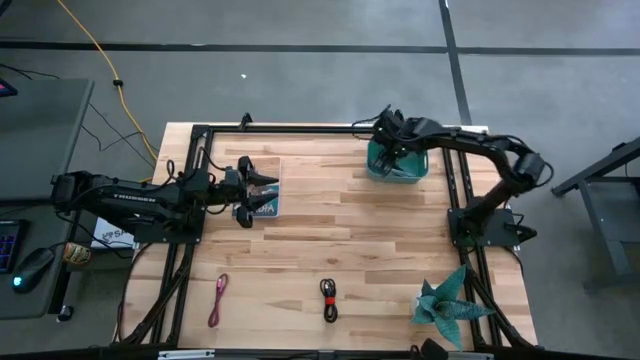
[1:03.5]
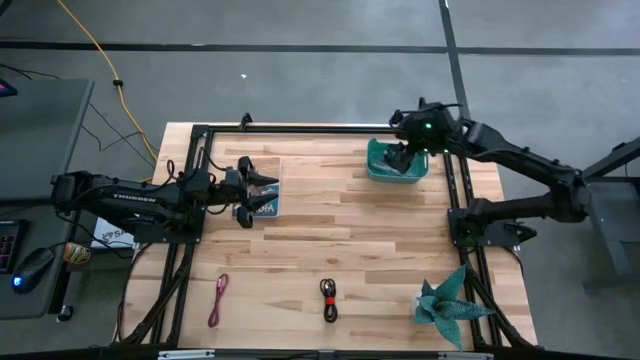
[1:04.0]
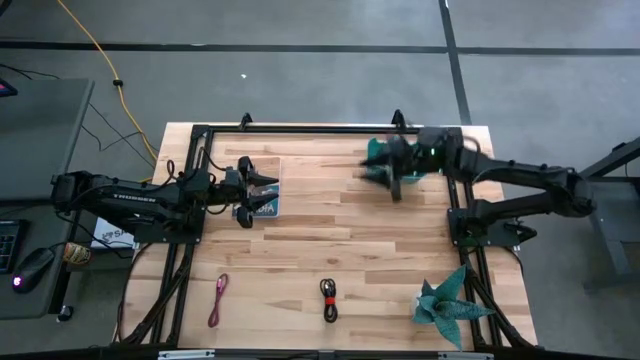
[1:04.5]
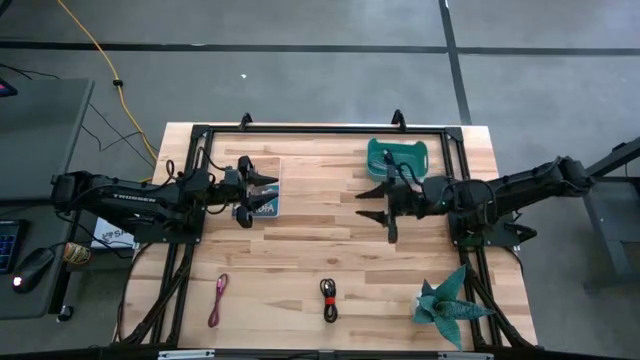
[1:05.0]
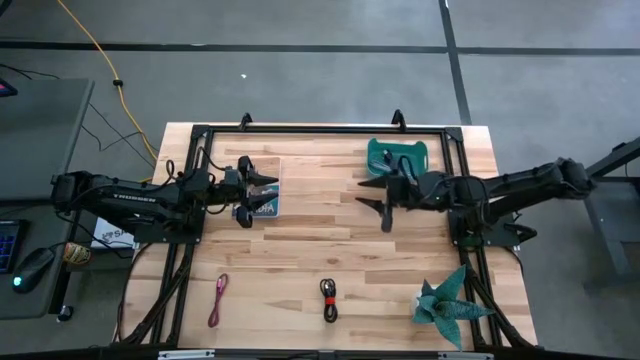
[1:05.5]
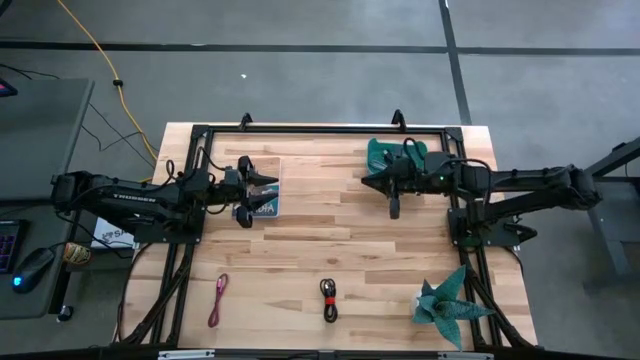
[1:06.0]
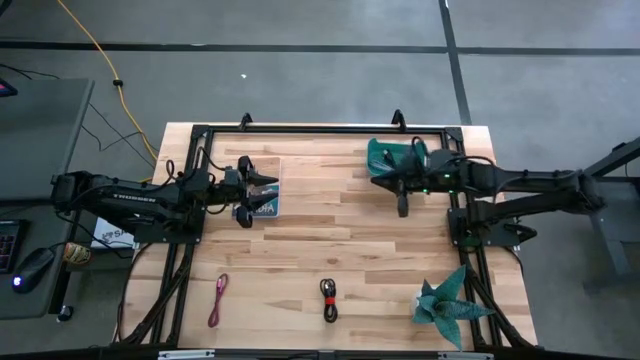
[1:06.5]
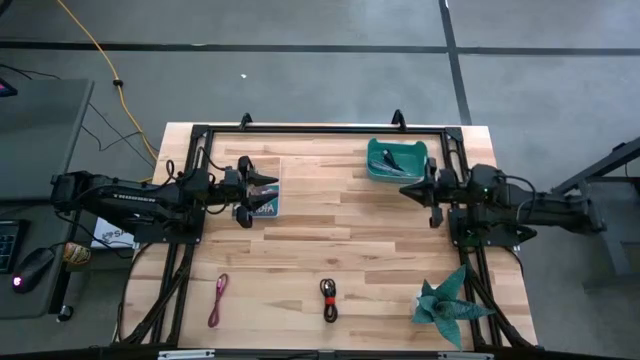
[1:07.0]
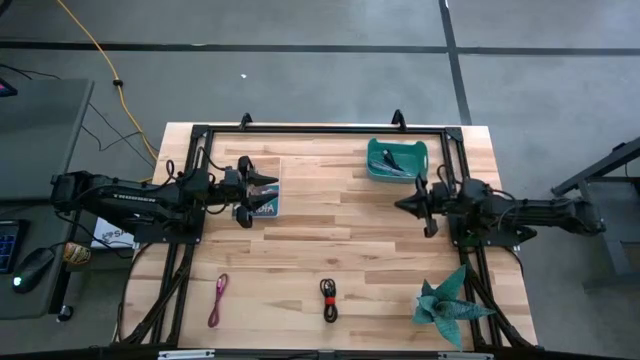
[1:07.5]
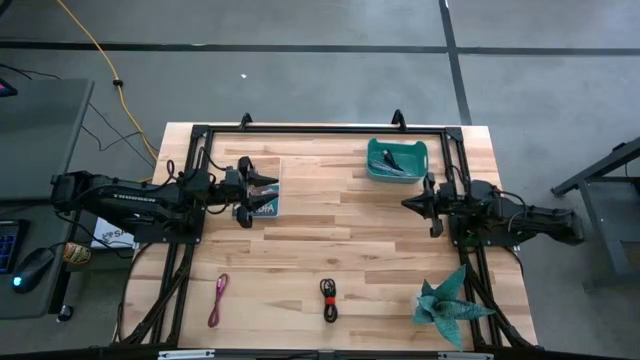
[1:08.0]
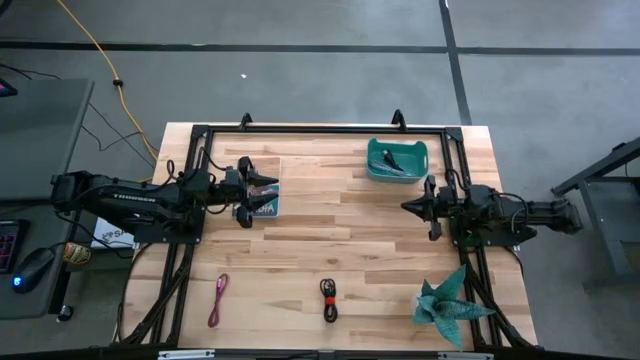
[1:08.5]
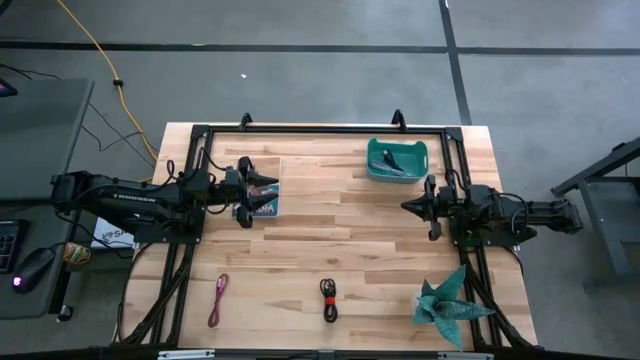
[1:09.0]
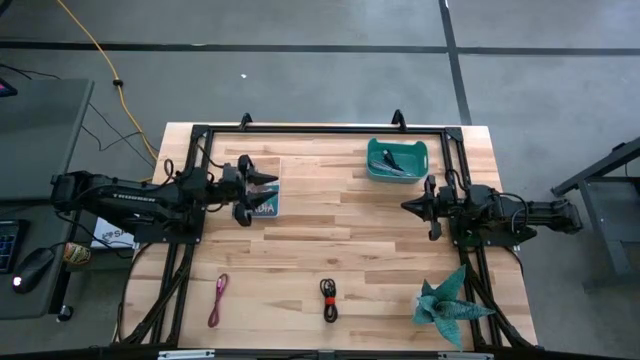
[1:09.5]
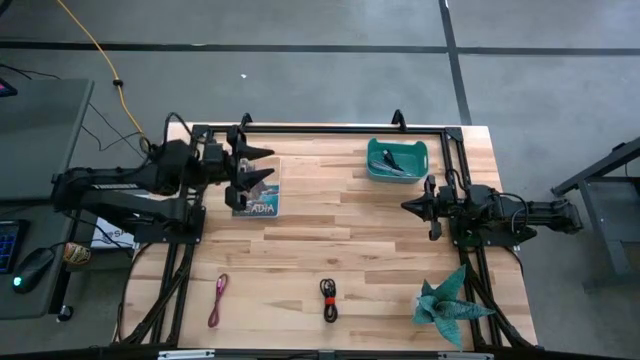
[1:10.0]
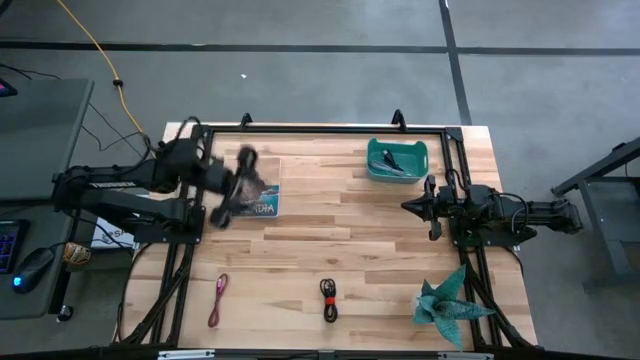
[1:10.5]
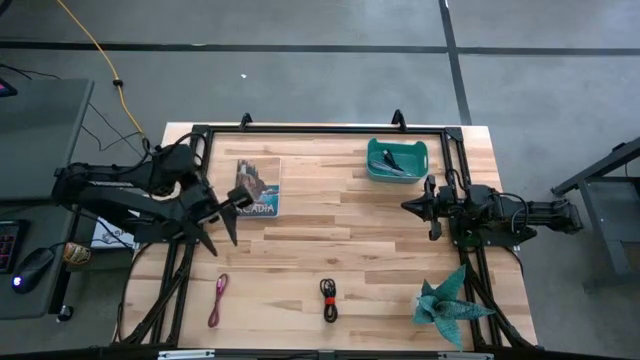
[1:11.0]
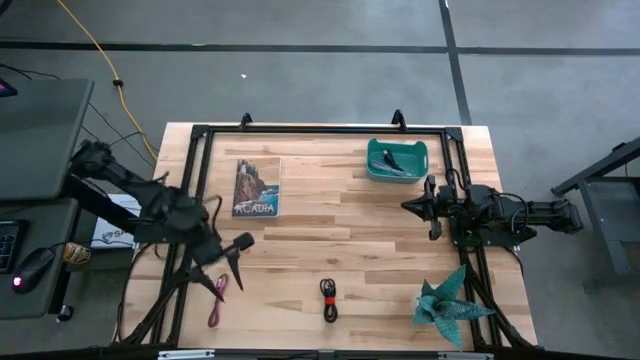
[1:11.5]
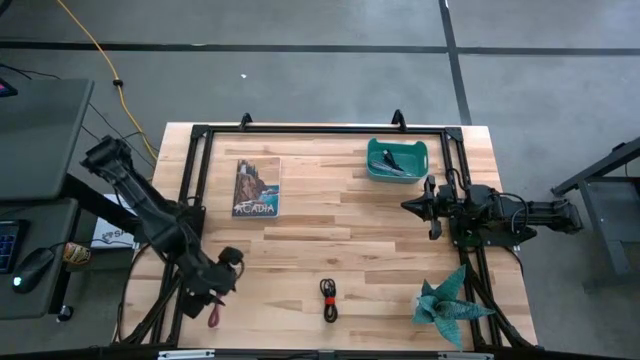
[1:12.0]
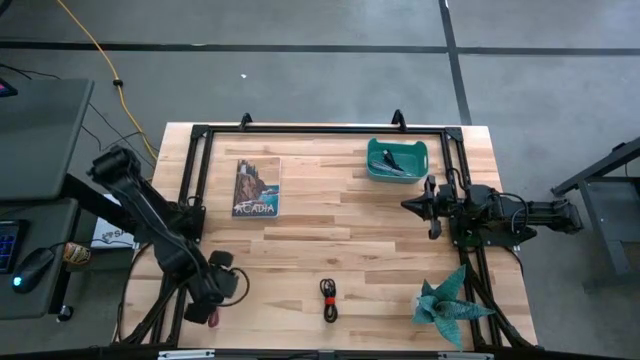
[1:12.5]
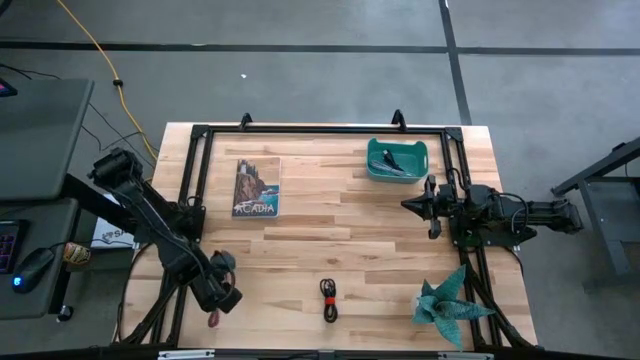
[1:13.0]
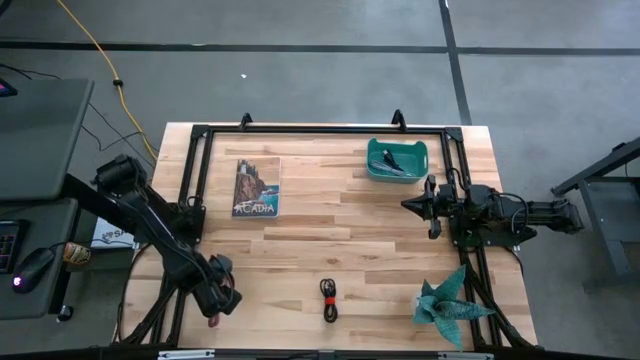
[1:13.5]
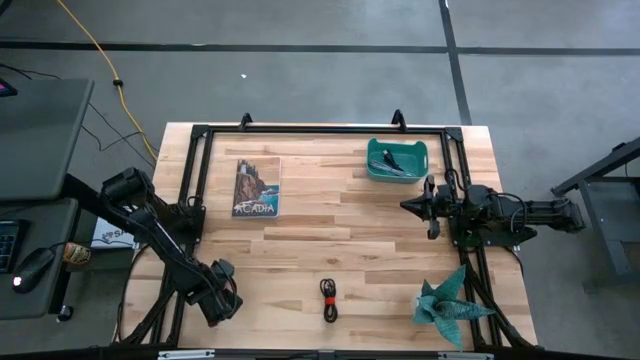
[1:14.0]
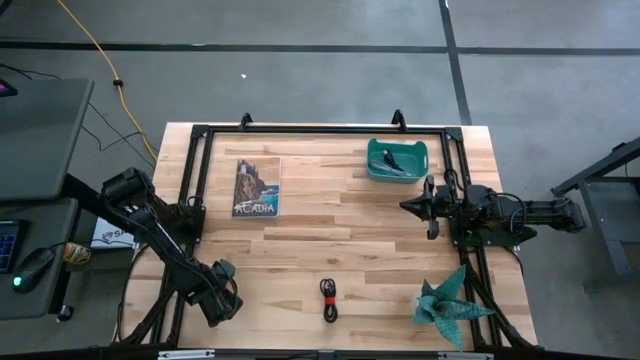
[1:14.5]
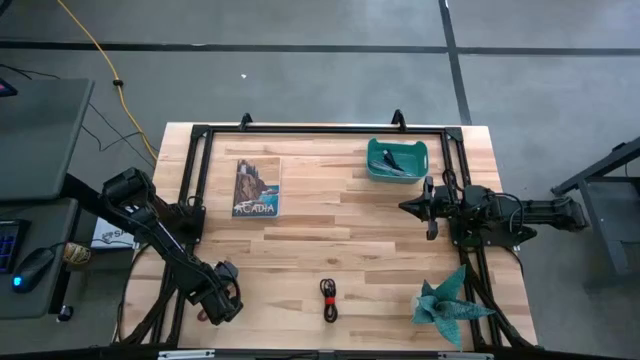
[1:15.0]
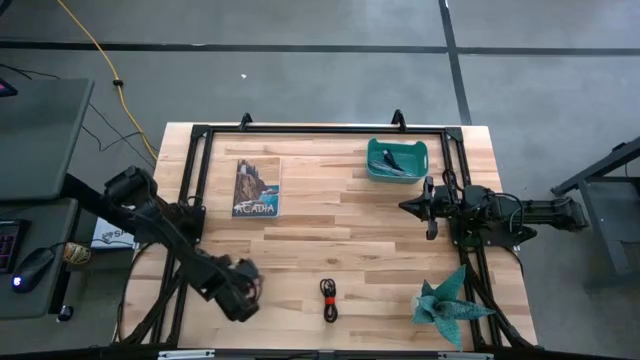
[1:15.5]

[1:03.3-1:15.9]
Task: Pick and place USB-C Cables
Put the pink charger cable into the green bin

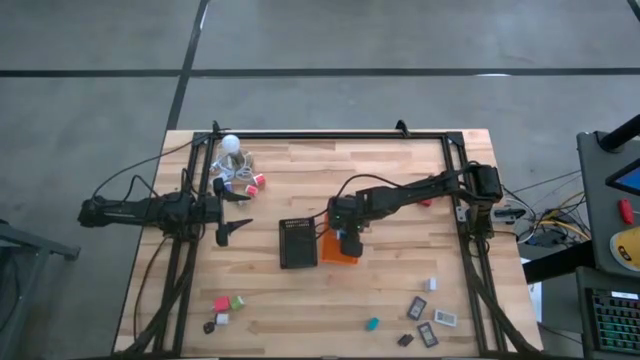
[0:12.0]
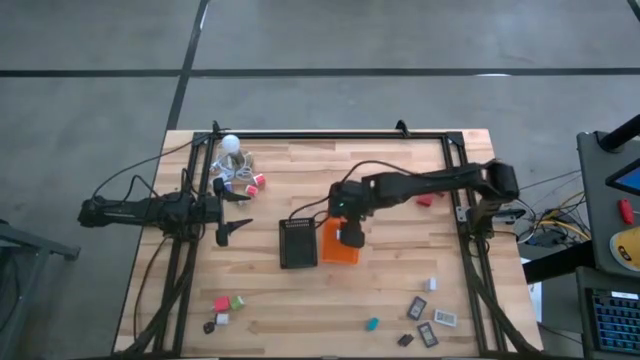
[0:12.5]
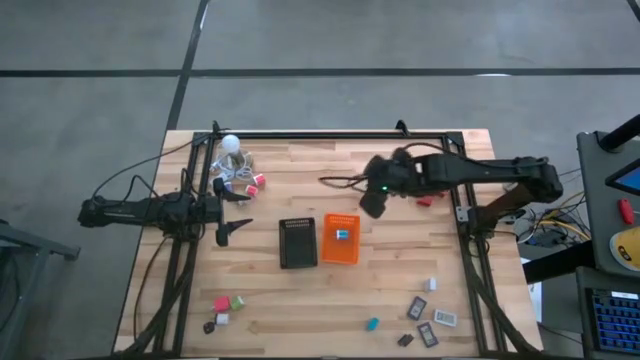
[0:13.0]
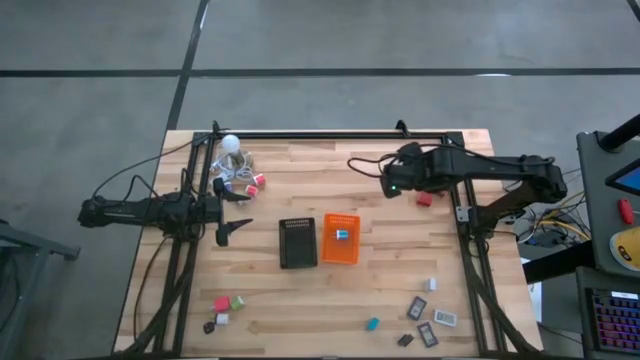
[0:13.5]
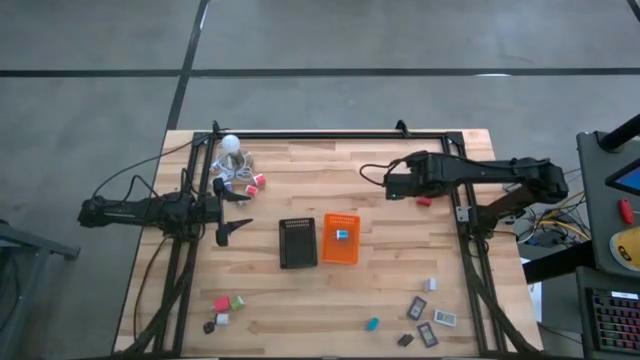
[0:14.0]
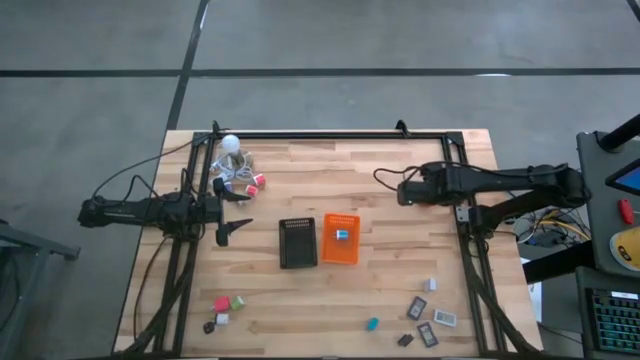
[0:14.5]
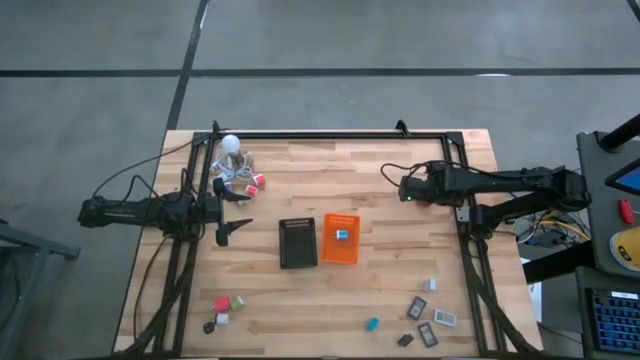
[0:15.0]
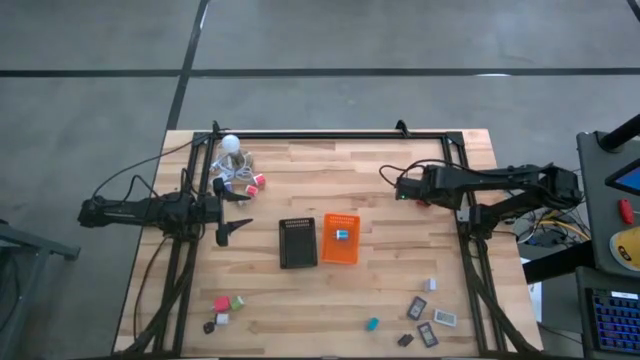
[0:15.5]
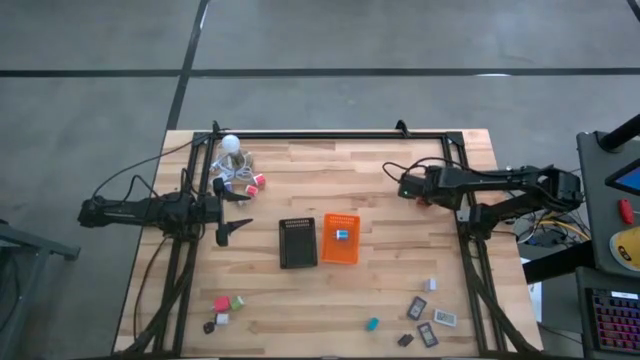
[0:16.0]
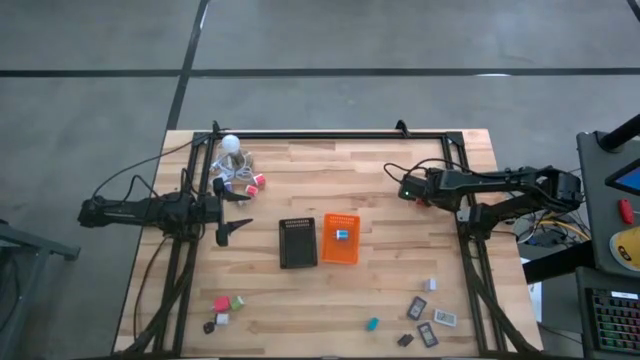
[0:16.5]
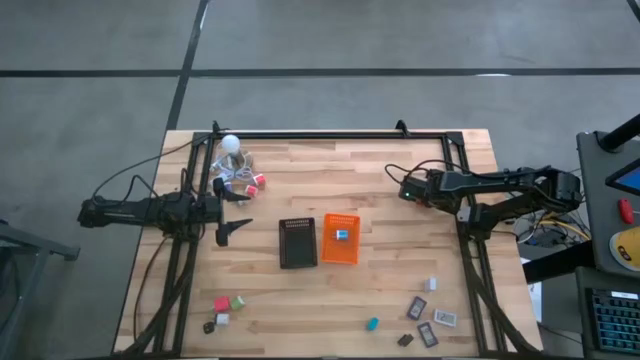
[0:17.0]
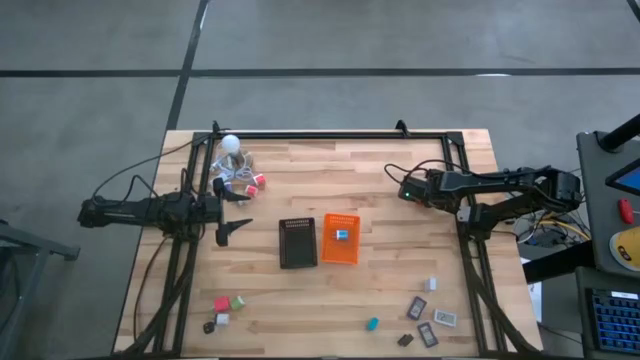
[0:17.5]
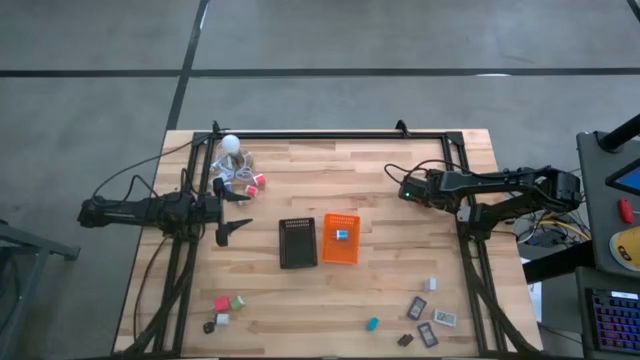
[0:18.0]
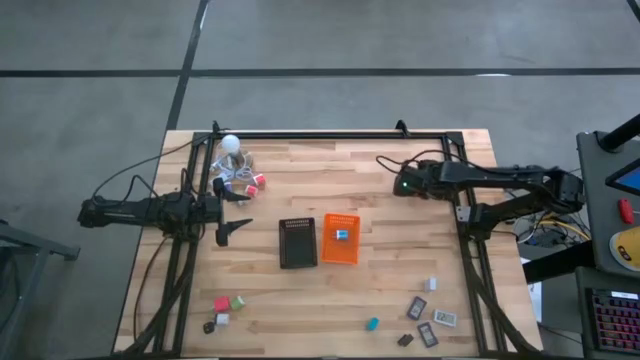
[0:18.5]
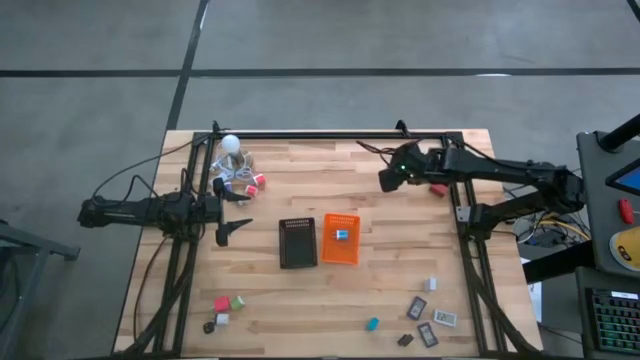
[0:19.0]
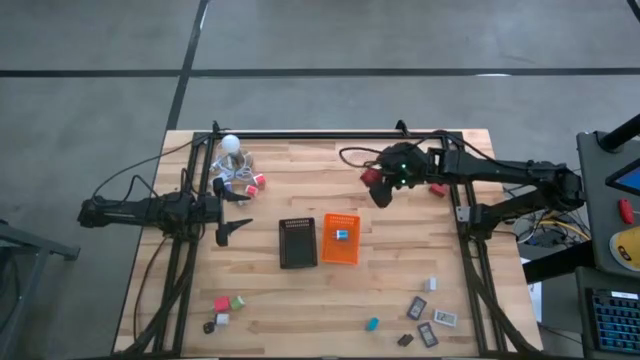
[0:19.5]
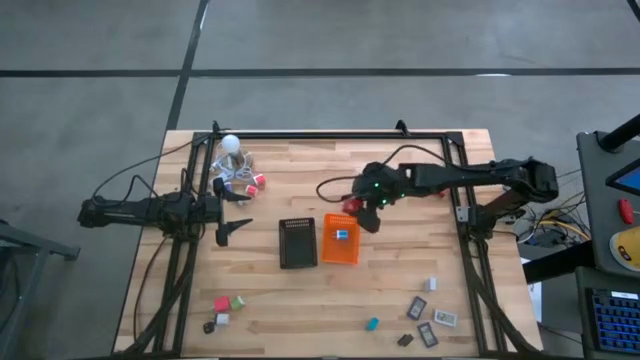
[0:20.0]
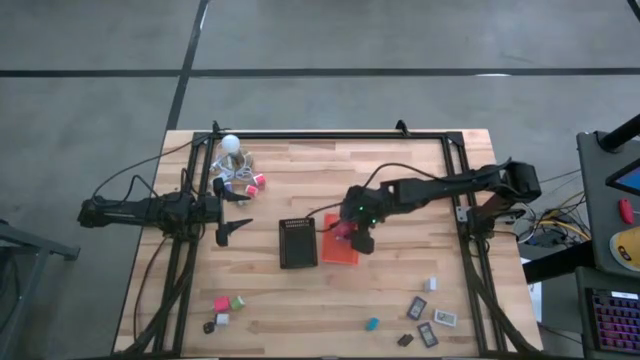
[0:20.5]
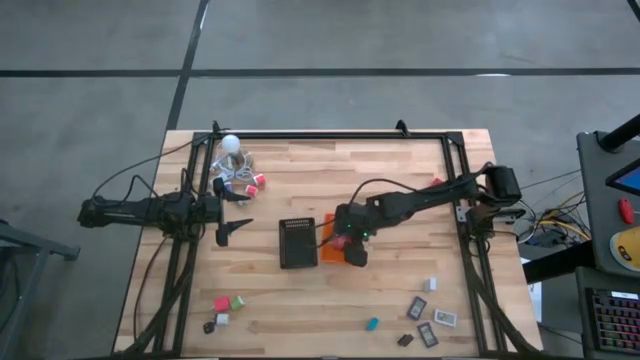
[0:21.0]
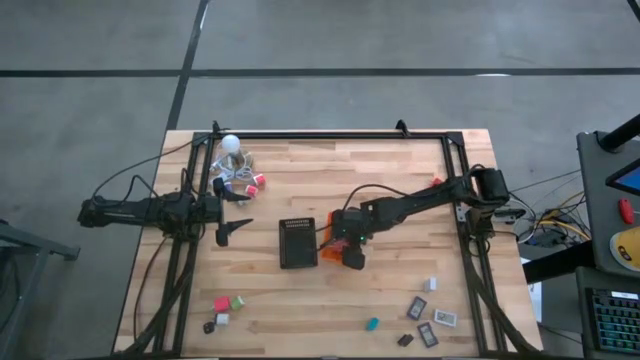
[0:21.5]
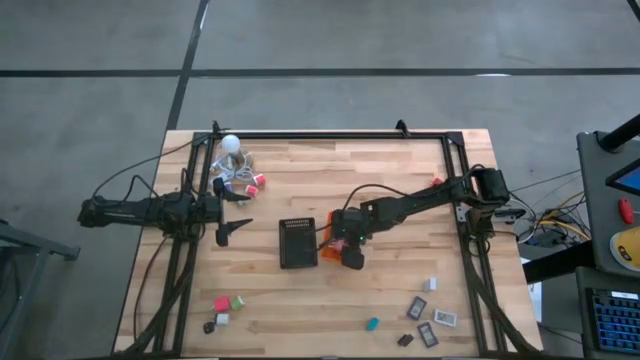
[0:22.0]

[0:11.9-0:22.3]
Task: Pick & Place Office items
Put the bottom red charger adapter into the orange bin
